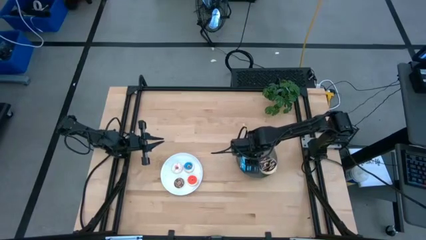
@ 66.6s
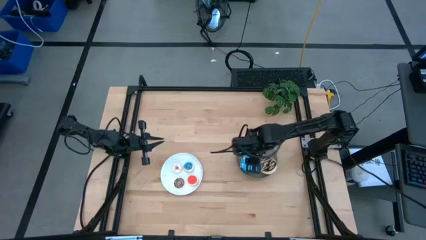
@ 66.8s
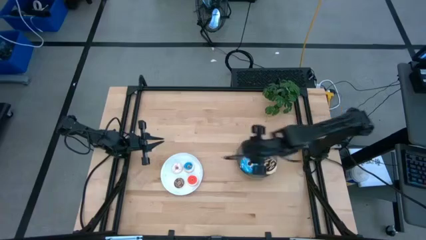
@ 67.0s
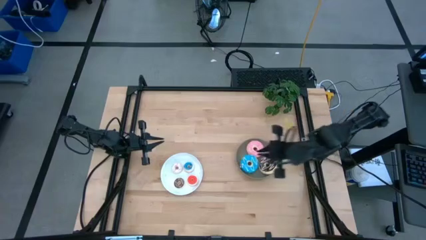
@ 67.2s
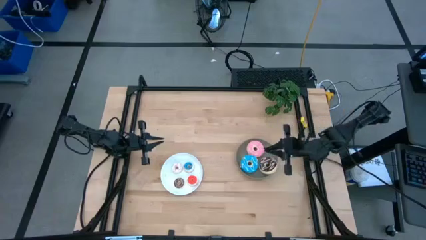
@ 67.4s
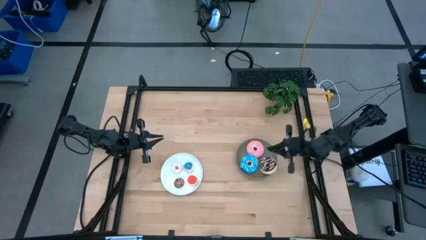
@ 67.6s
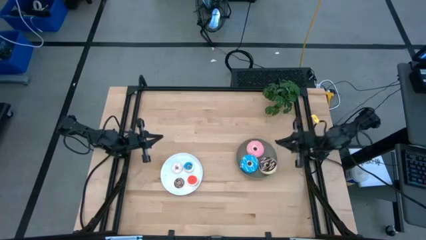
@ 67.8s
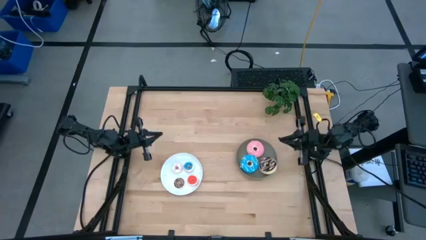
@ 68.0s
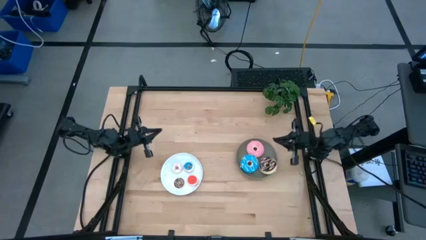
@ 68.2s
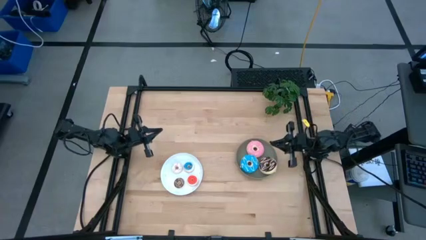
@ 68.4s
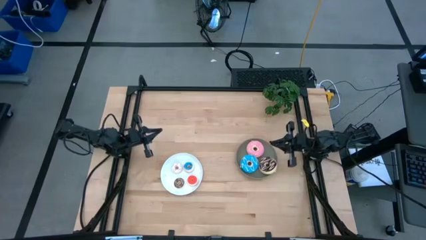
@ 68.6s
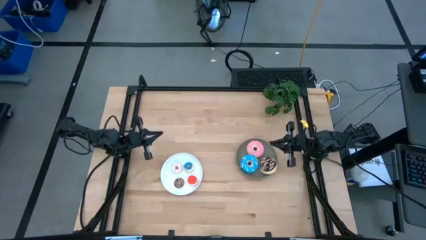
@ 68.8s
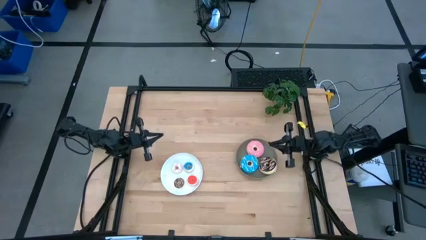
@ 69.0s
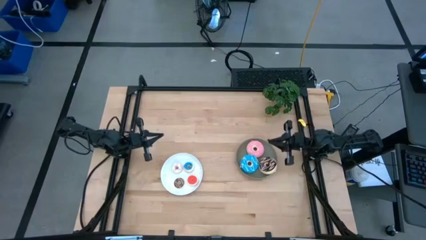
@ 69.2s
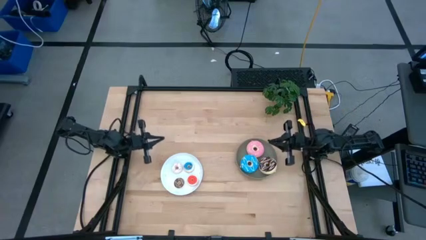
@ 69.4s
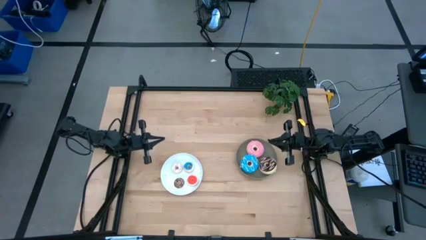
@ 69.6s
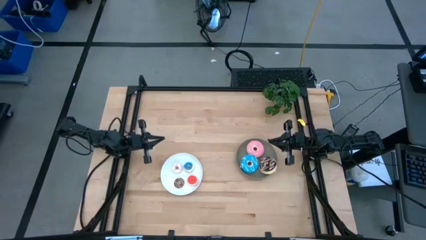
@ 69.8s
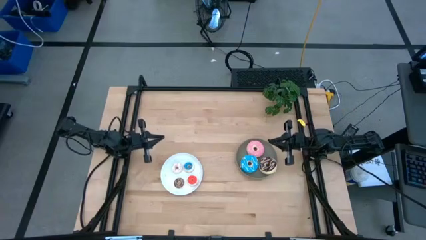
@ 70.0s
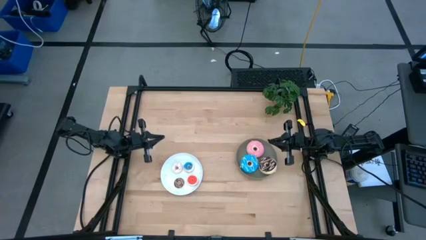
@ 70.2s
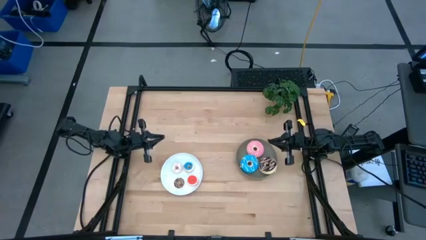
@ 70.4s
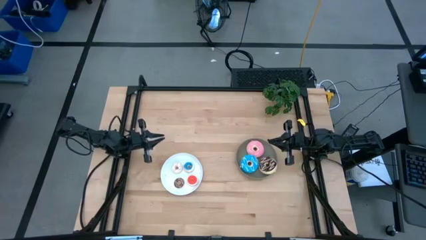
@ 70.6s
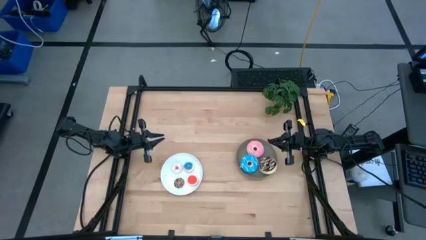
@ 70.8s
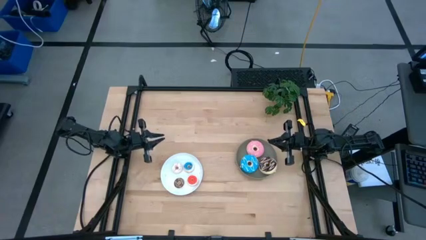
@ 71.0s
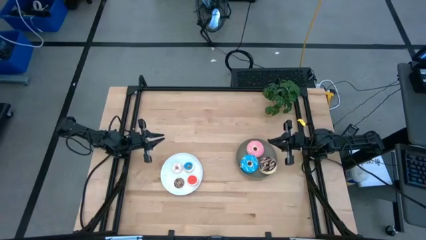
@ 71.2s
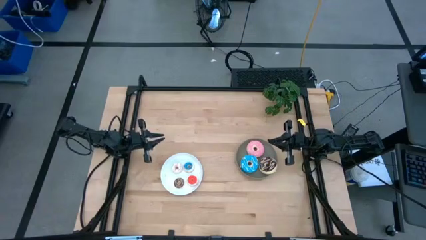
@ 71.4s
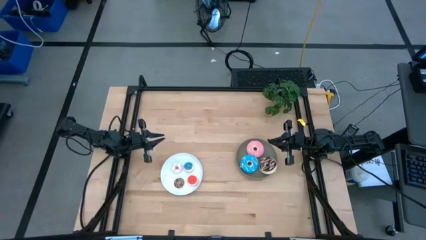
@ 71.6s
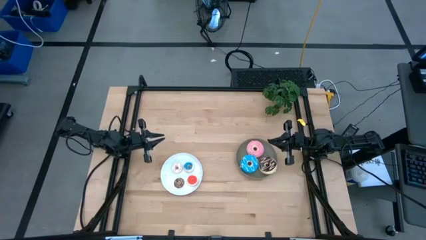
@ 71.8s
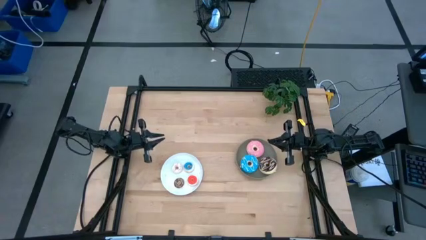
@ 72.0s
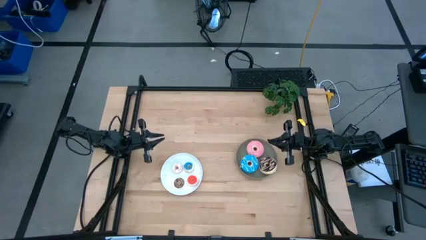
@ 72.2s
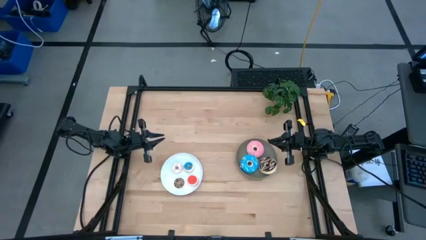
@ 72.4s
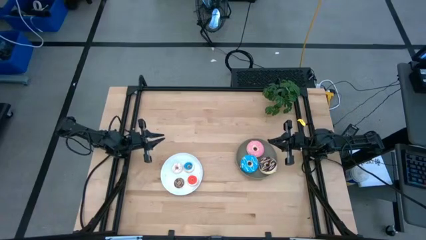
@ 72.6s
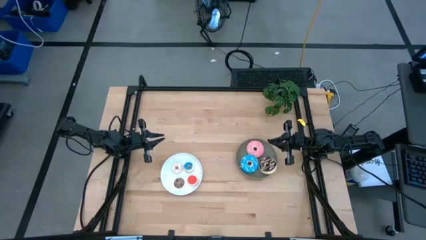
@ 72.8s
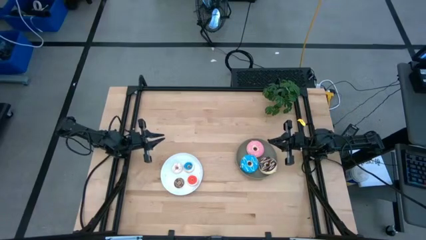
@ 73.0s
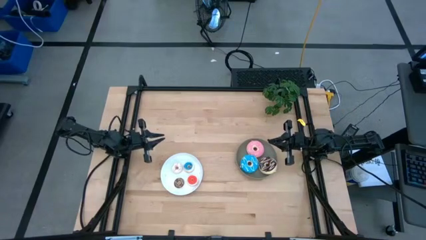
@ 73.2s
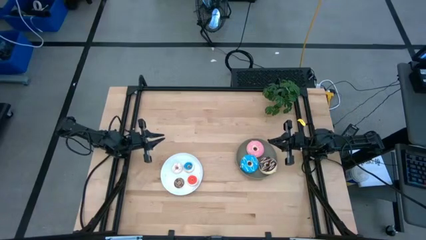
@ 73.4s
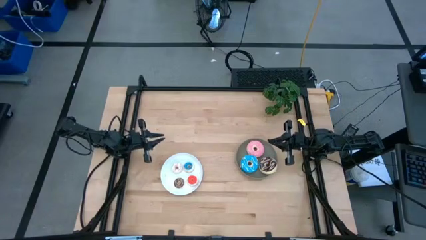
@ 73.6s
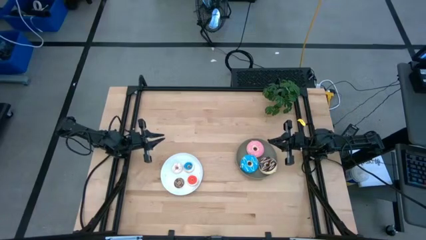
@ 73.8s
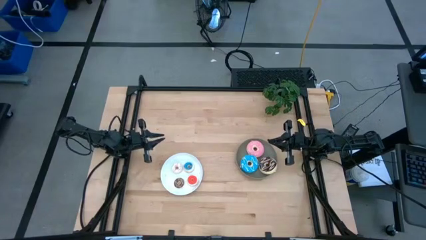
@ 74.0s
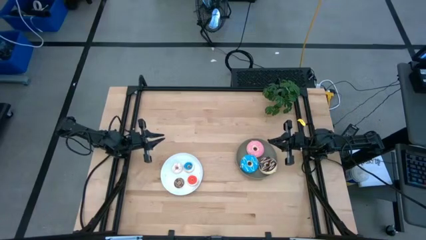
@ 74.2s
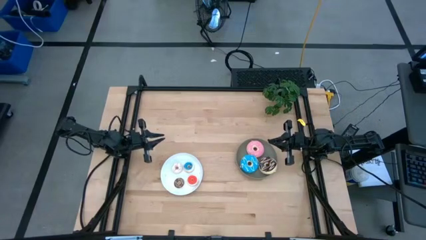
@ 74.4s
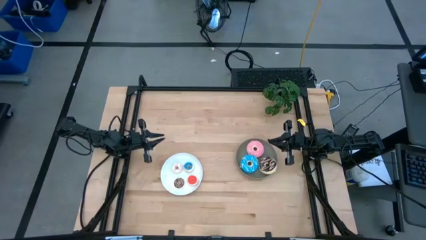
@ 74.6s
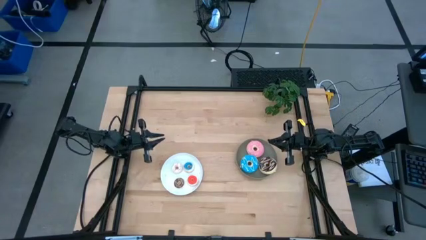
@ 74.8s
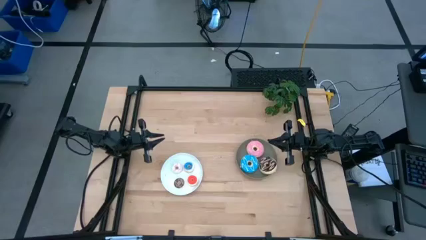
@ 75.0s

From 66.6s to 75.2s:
Task: Pick & Place donuts
Return to Home Position

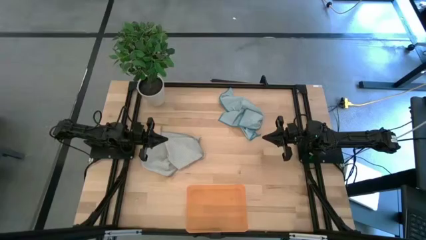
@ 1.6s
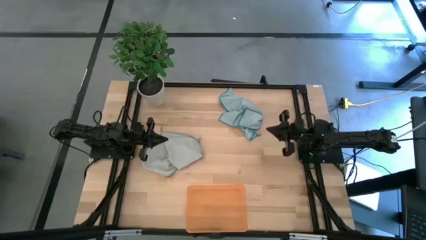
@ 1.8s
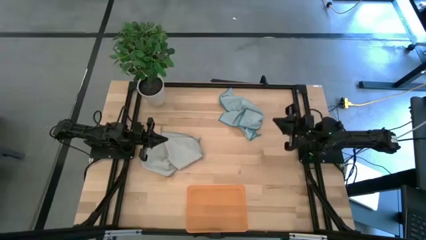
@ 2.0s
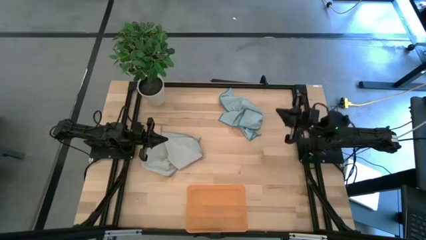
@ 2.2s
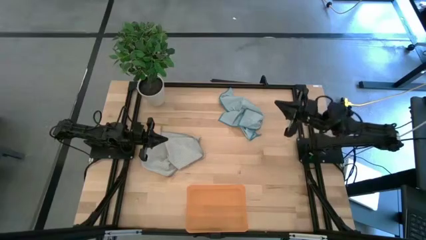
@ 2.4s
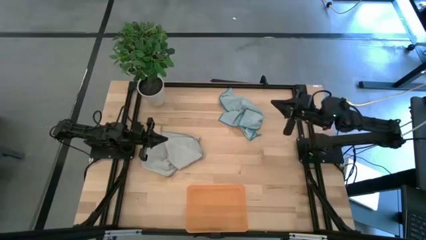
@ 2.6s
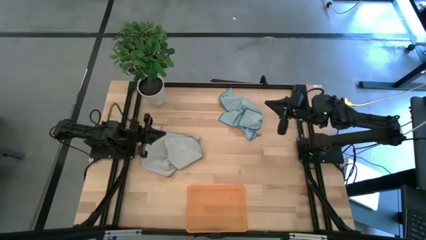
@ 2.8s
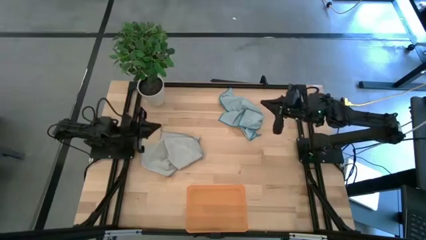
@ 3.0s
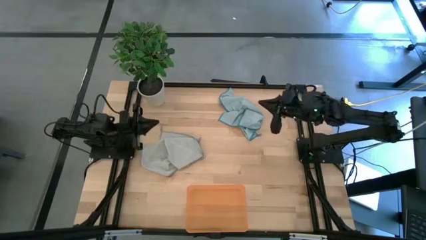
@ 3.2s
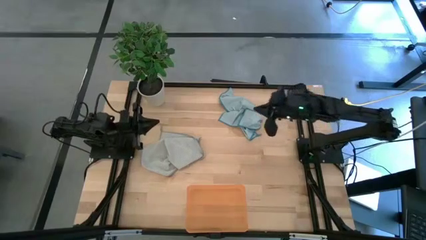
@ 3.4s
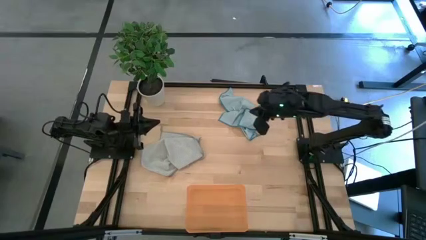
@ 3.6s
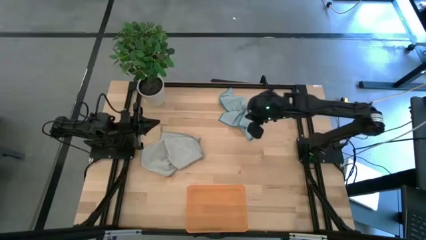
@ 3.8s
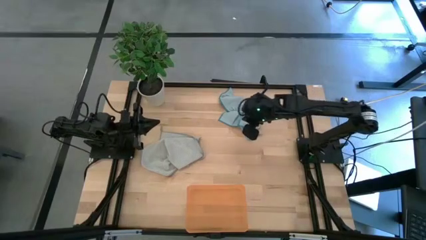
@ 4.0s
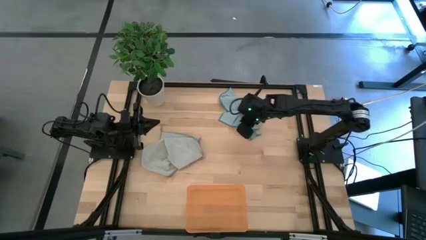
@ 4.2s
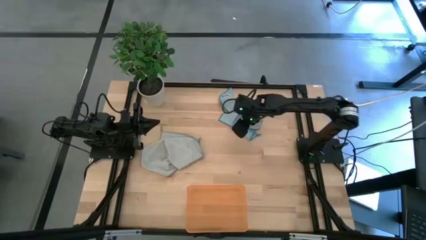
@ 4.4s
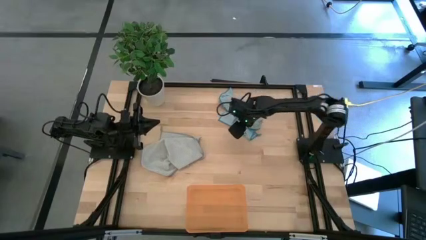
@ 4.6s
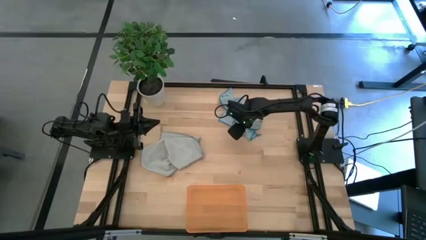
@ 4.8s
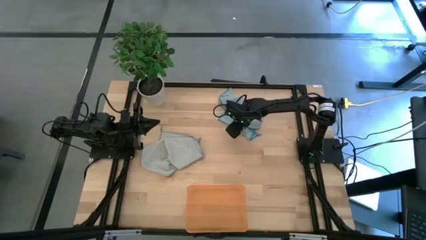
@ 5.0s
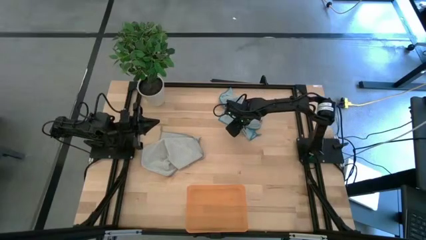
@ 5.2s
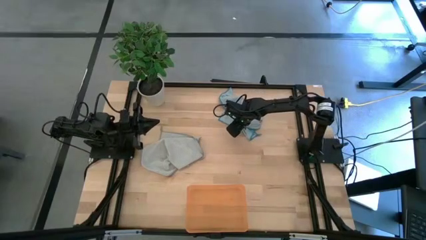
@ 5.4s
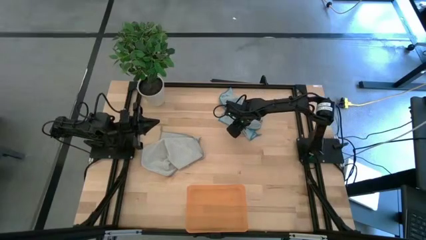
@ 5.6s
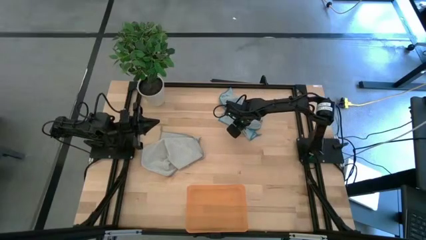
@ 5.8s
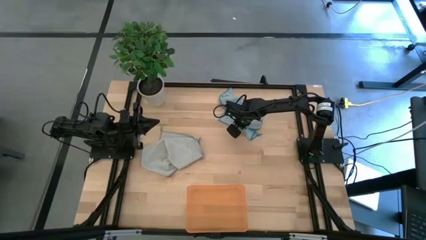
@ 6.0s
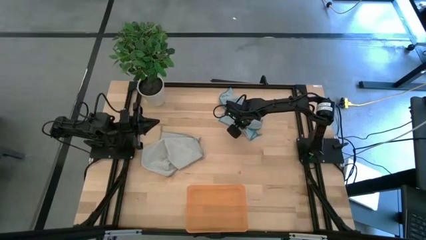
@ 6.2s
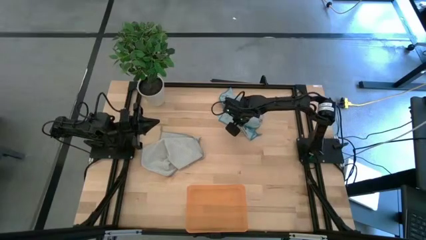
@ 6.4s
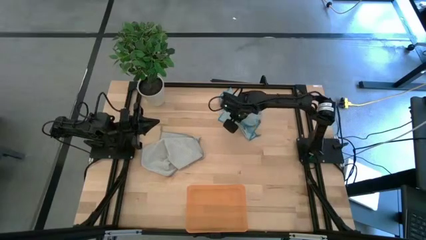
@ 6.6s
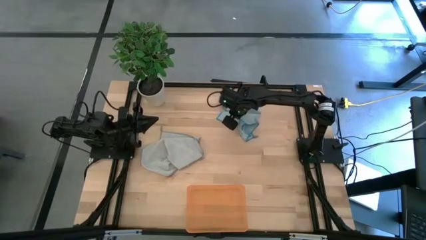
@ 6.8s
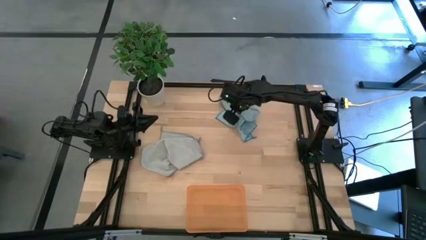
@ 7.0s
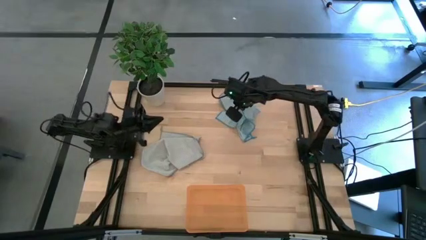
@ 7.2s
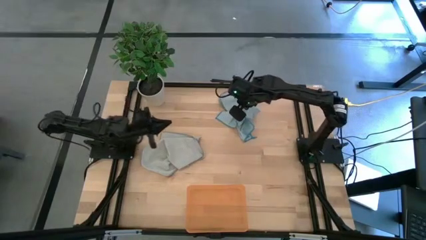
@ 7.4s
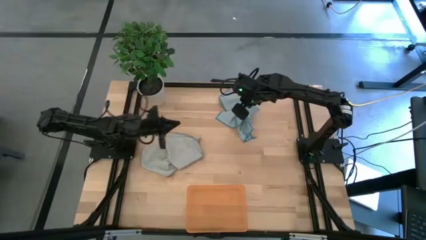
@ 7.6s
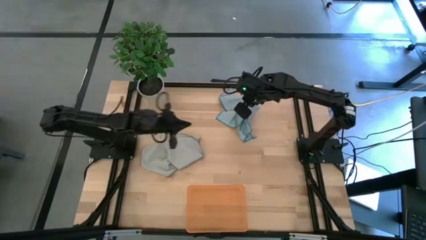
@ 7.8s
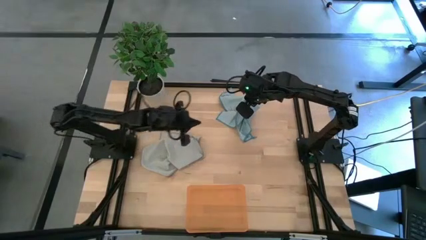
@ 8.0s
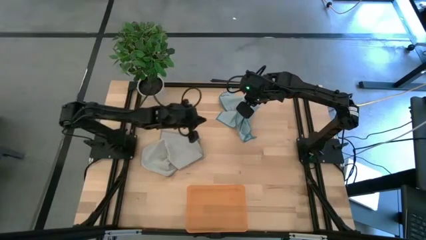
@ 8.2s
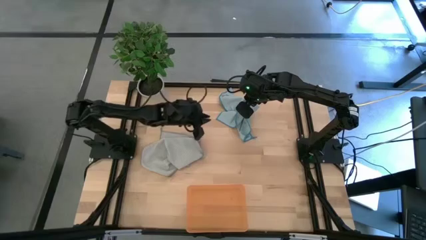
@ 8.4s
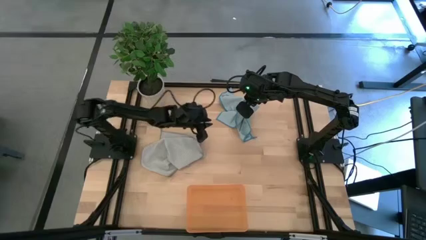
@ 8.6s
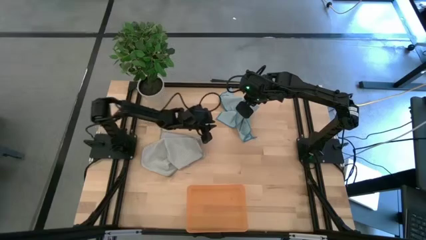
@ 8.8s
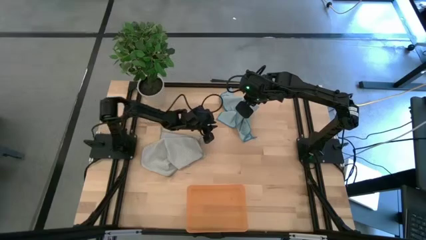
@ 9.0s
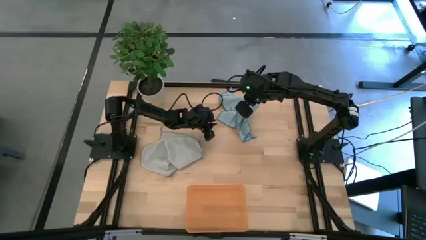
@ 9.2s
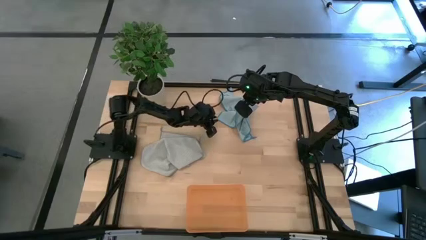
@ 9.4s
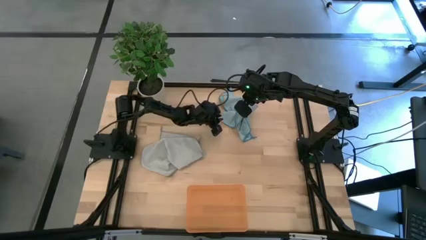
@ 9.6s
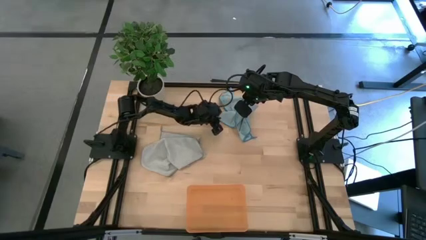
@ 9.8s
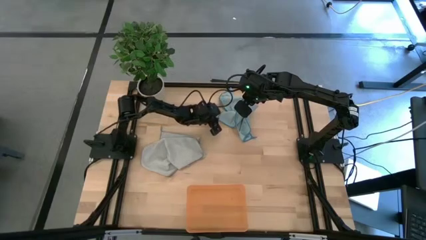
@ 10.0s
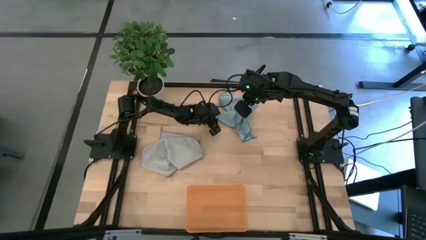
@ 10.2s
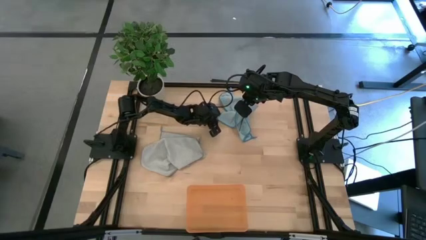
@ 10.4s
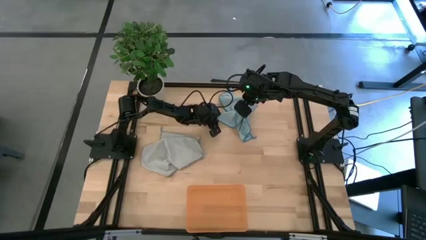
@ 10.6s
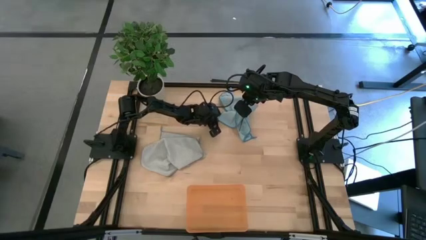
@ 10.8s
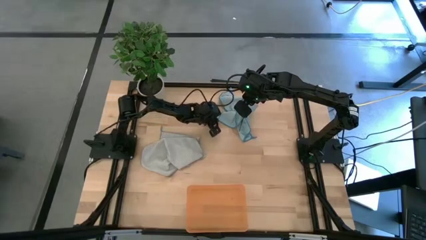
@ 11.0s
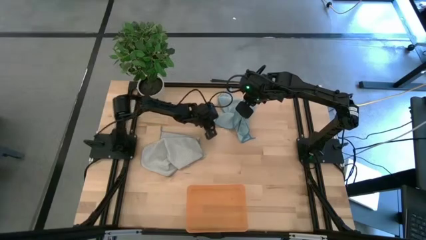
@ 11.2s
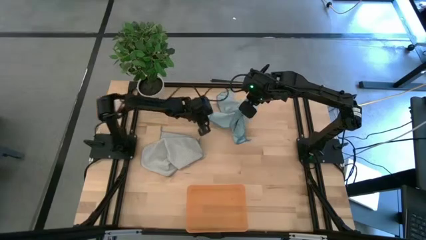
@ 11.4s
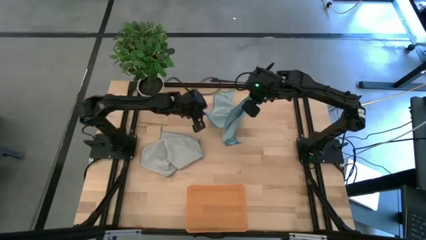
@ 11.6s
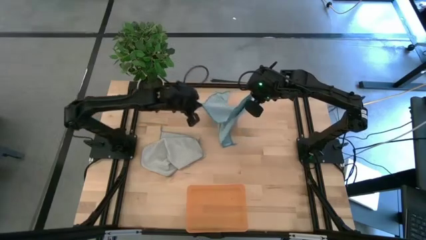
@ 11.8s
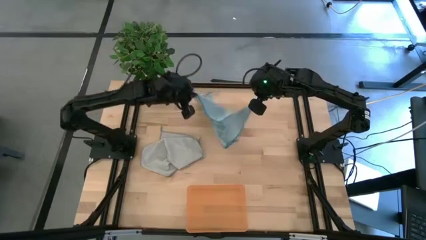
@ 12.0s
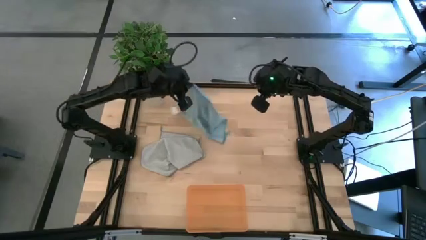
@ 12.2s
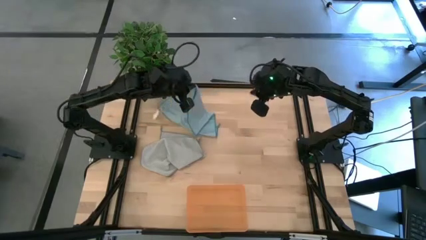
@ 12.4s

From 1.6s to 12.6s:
Task: Roll microfiber towels into tight, uniform cylinder then place into a basket
Fold the blue towel
